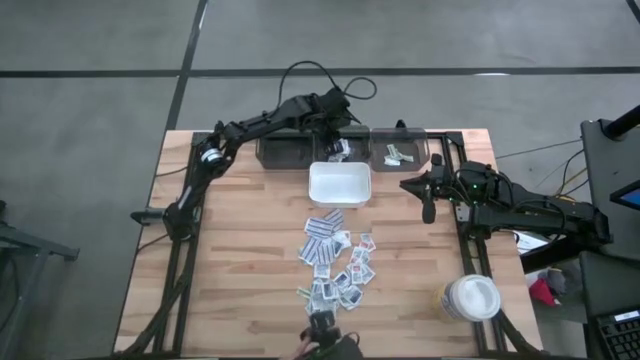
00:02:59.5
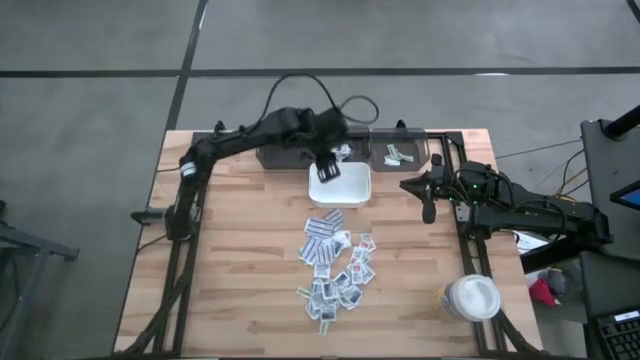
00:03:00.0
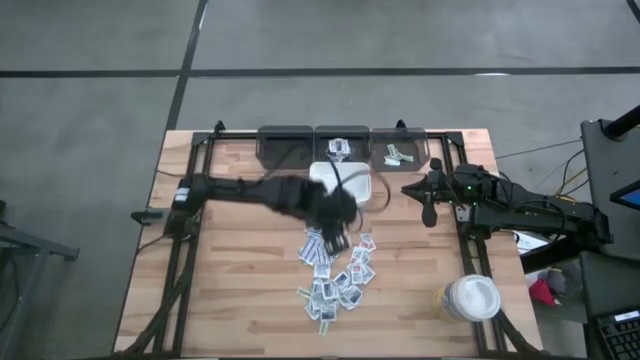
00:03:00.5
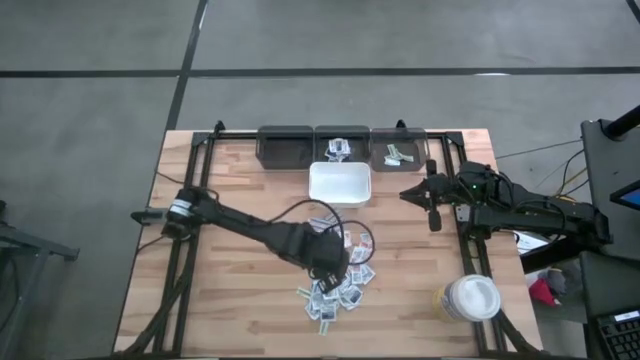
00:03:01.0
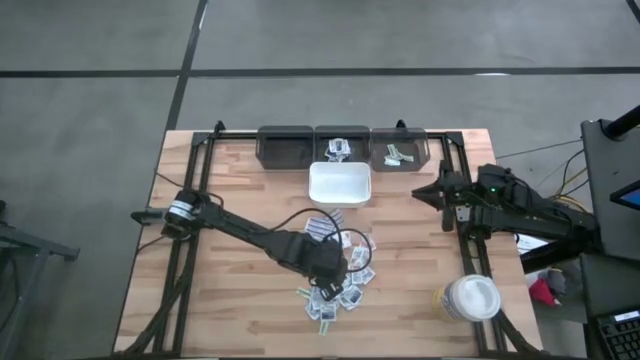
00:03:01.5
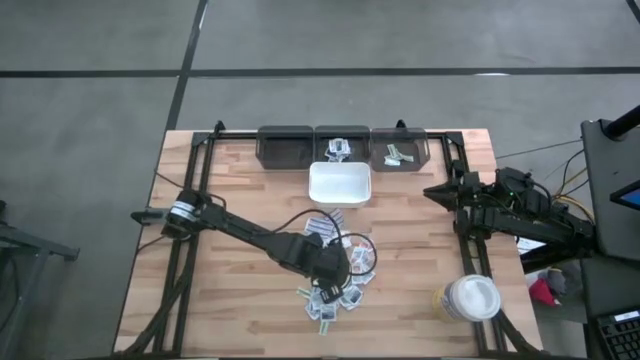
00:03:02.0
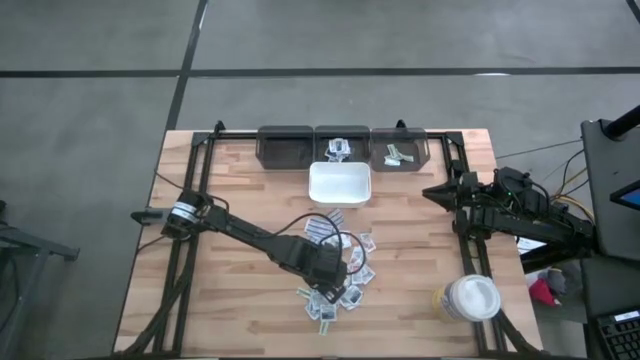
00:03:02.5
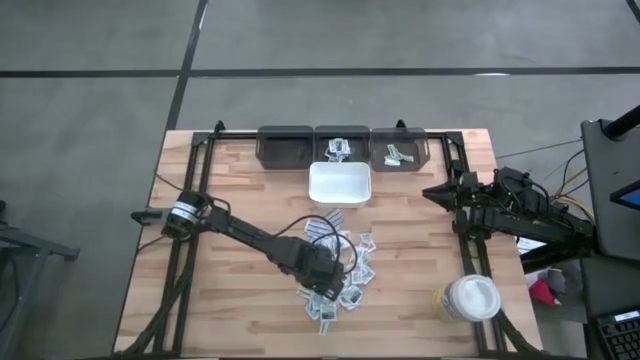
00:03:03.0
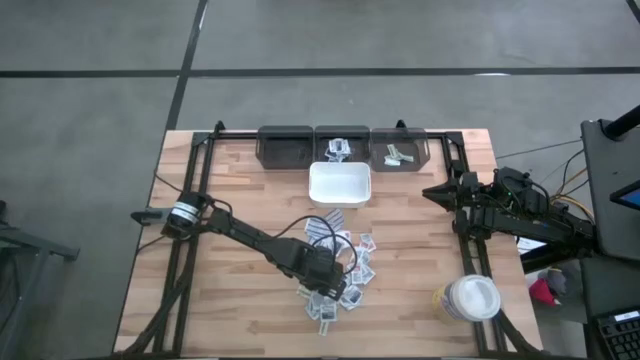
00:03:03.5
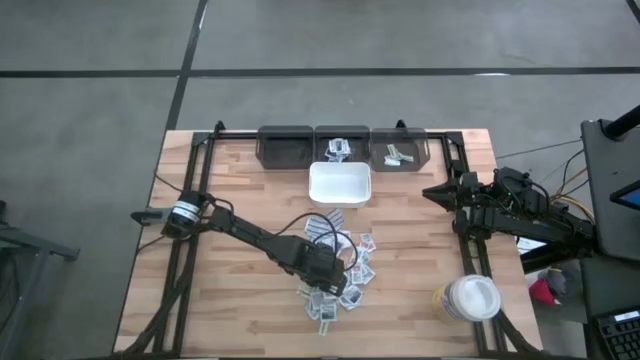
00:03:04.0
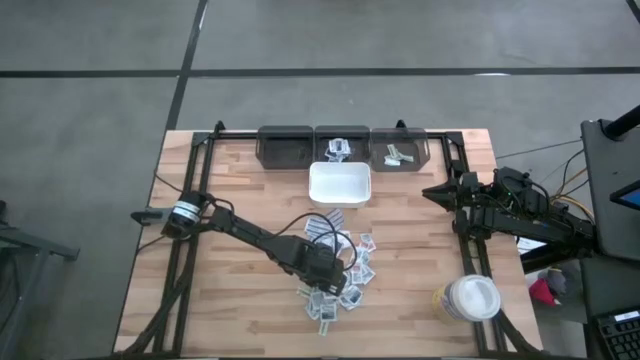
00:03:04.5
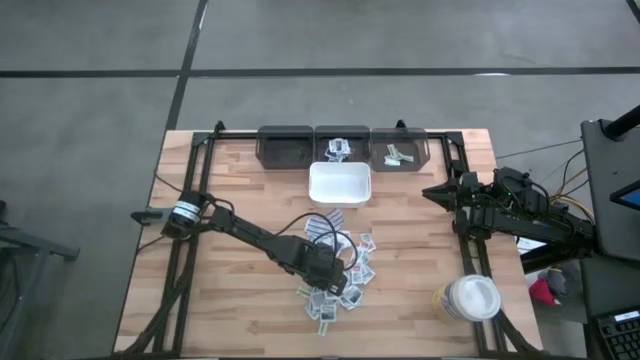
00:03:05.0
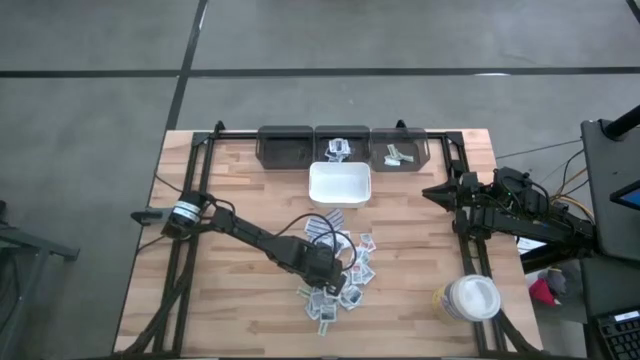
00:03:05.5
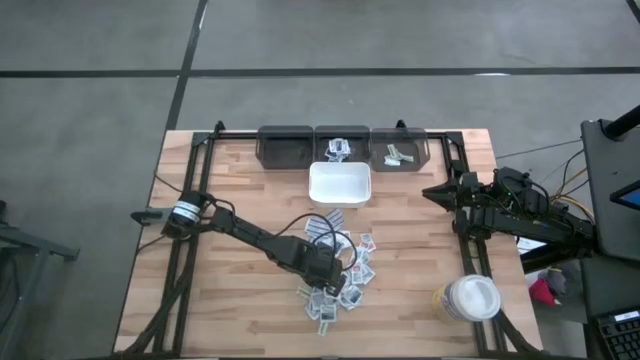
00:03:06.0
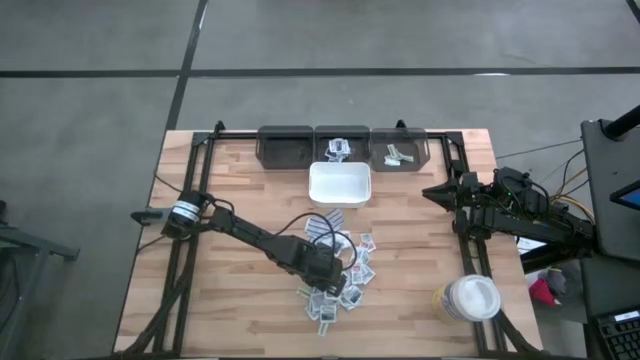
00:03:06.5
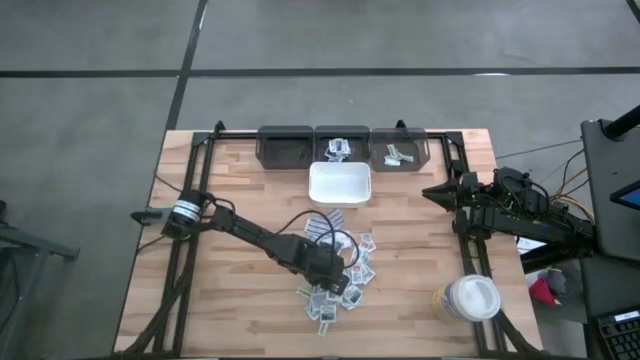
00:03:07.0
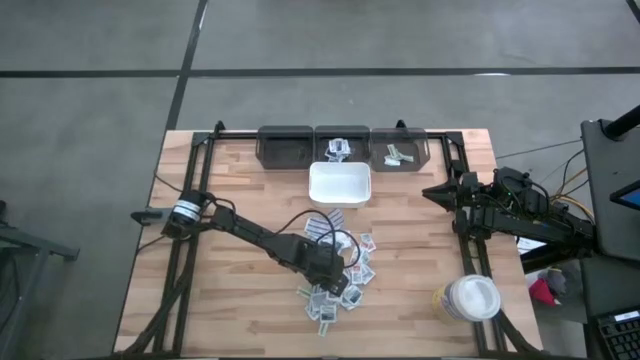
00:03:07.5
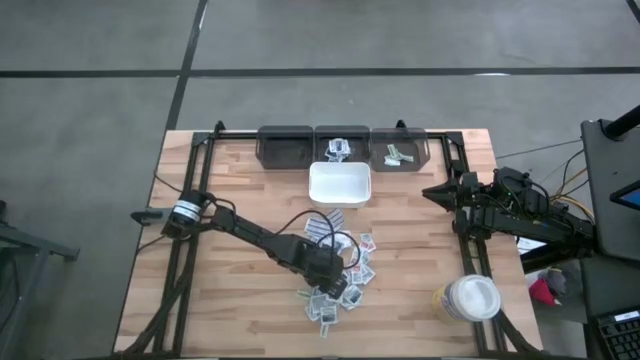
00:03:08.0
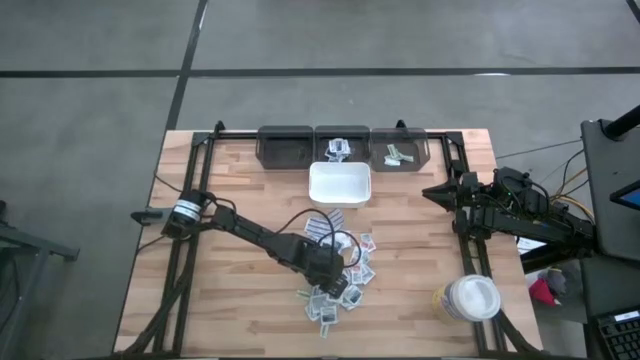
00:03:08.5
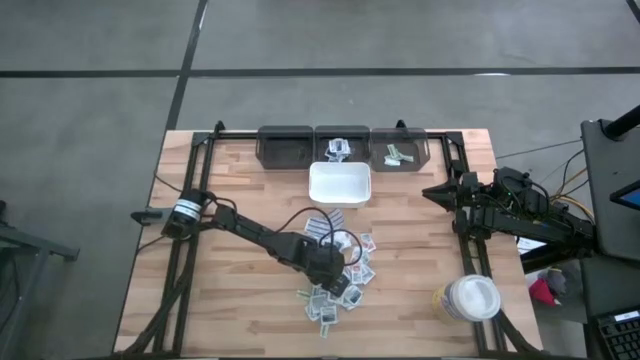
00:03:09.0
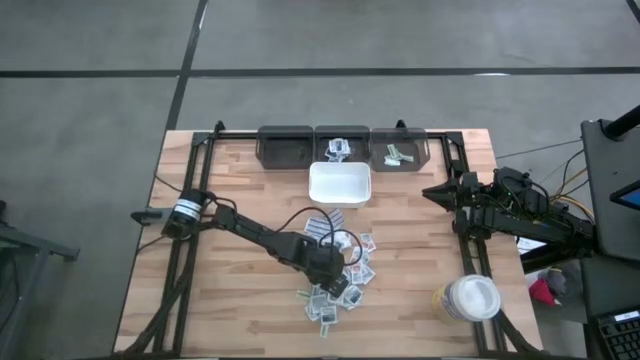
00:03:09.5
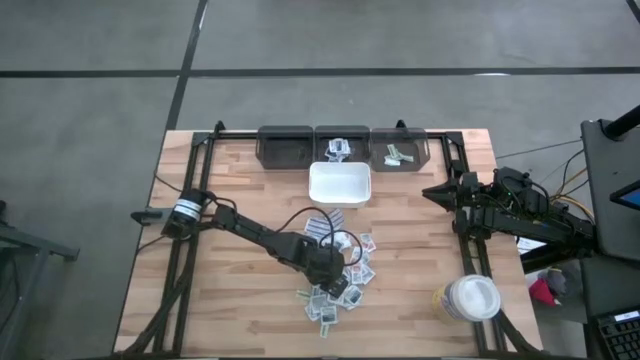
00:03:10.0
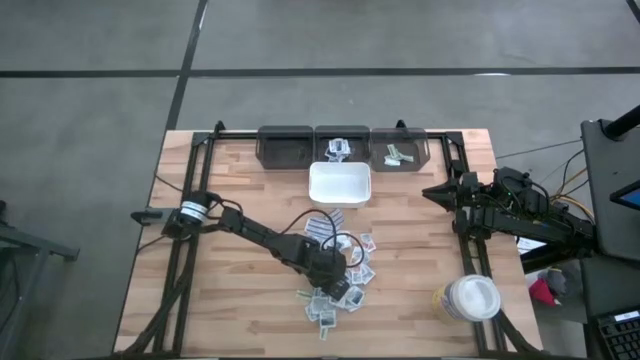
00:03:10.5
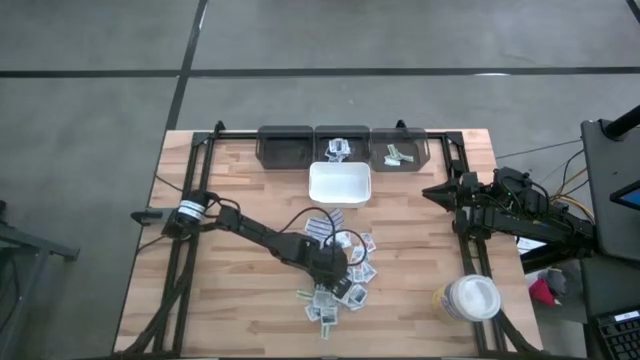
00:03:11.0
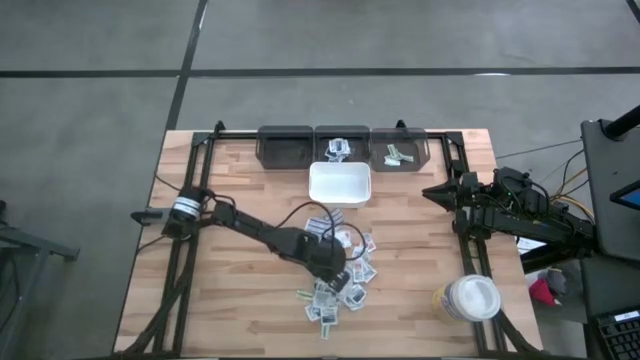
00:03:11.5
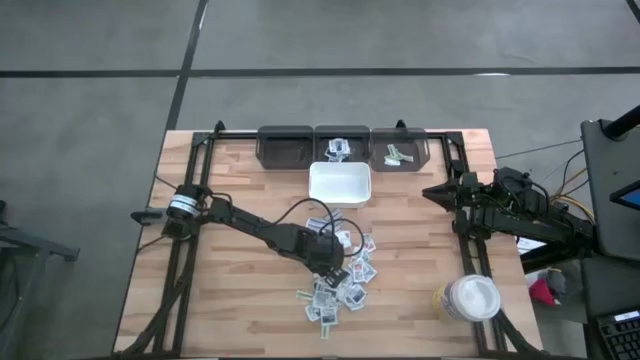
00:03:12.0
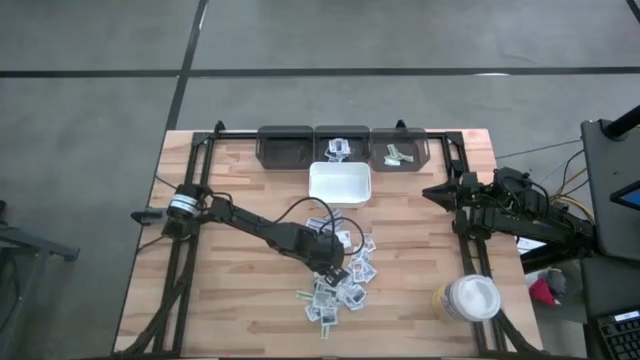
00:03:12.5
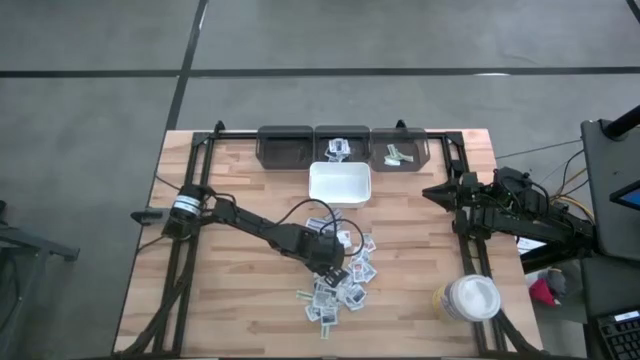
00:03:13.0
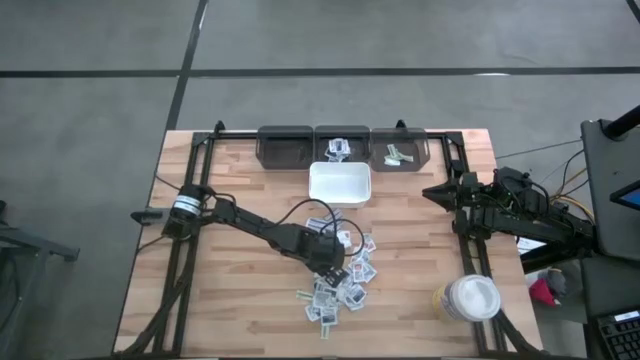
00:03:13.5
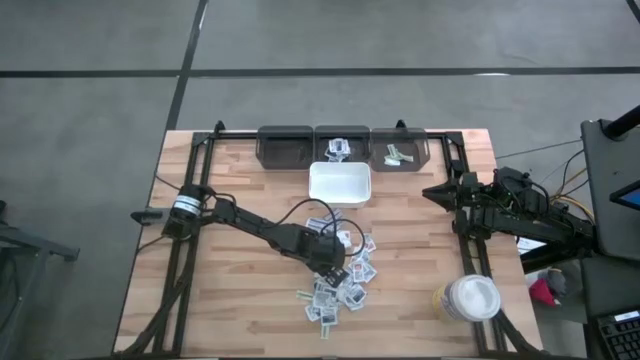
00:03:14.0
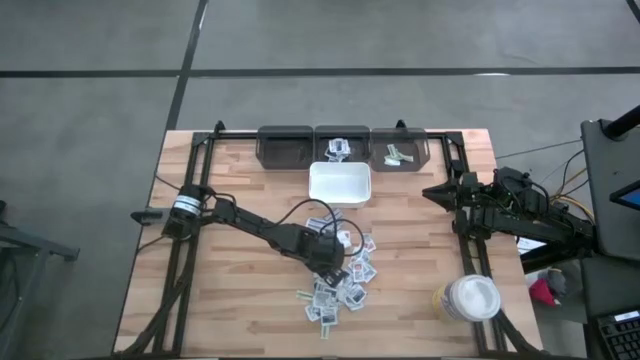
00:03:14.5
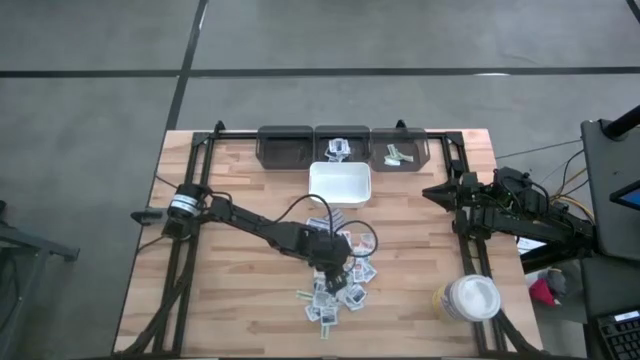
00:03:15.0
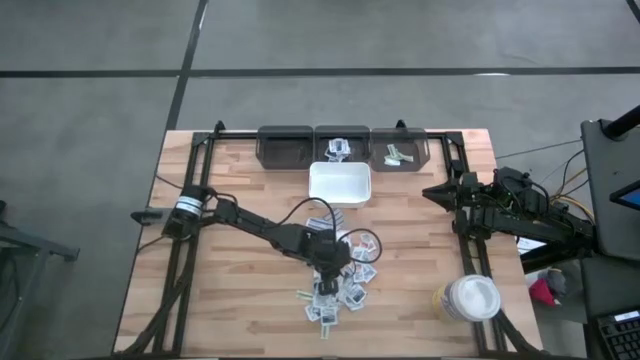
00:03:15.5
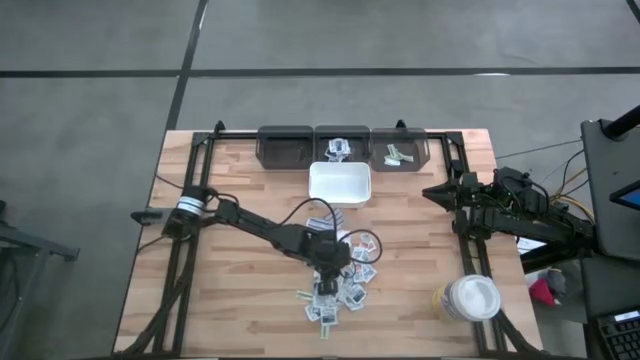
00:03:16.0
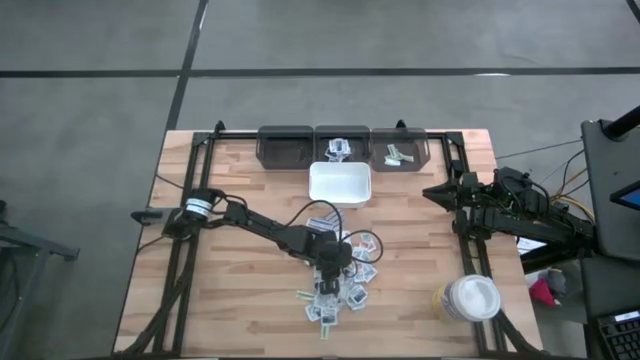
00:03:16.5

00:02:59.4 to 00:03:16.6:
Task: Pick & Place First Aid Supplies
Put the blue alcohol pad into the middle gray bin

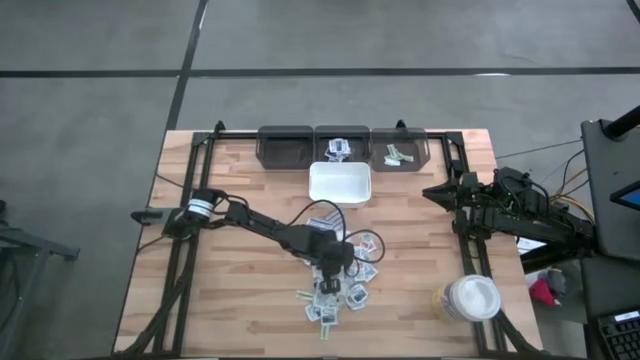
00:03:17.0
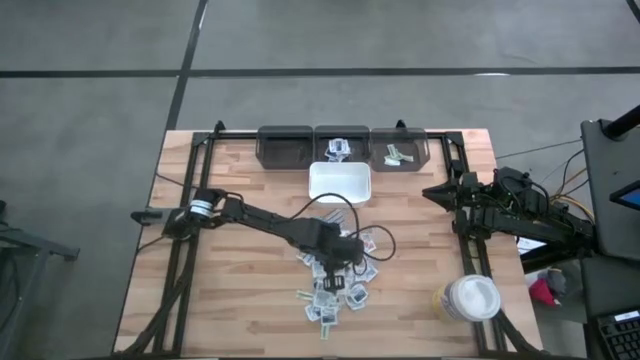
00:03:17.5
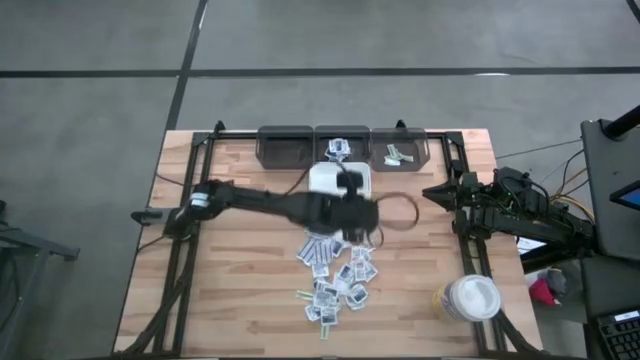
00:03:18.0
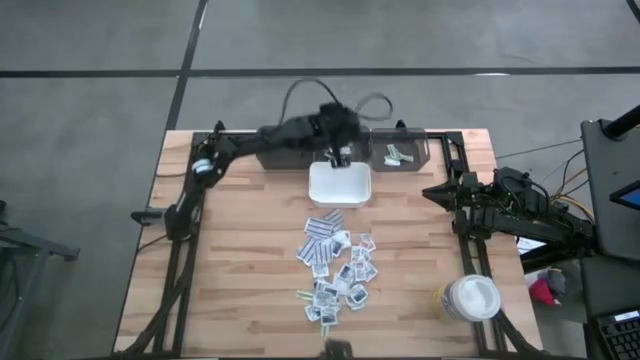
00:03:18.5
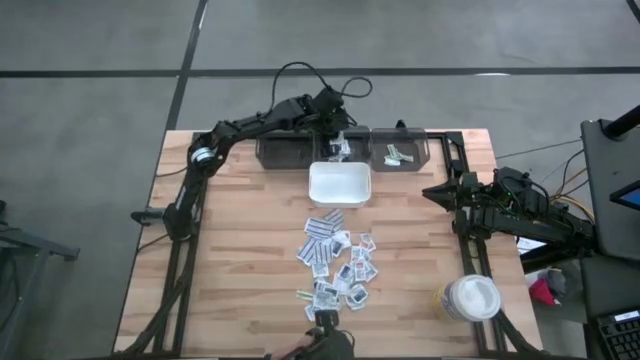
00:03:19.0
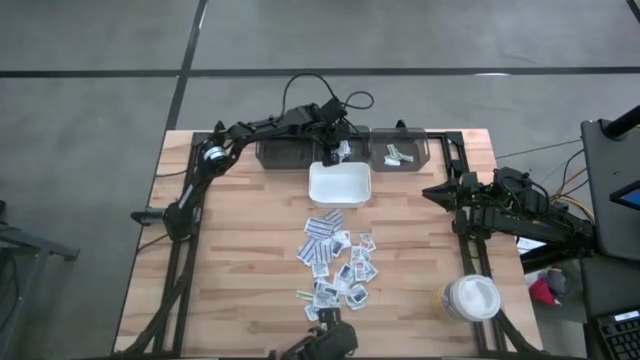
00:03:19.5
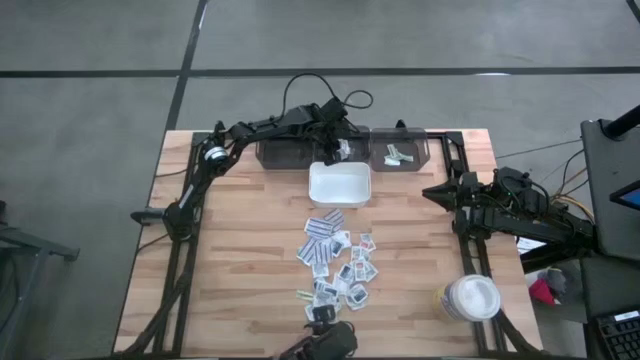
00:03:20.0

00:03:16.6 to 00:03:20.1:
Put the blue alcohol pad into the middle gray bin

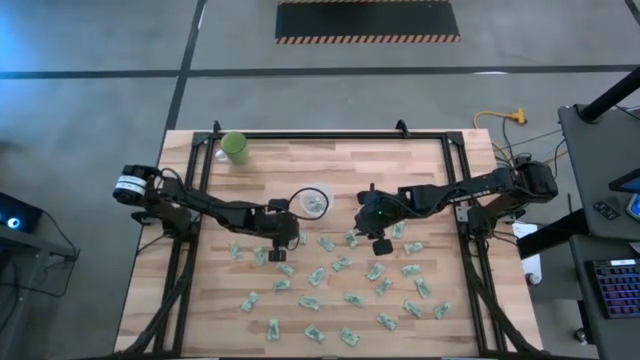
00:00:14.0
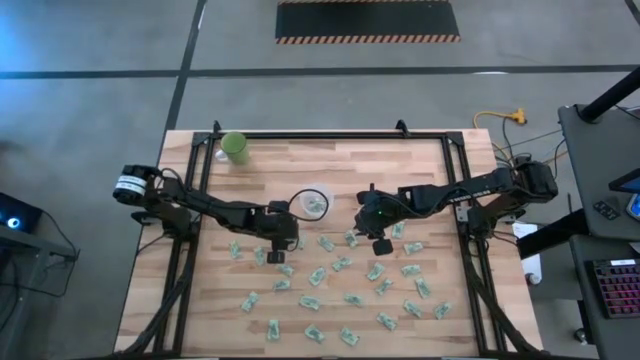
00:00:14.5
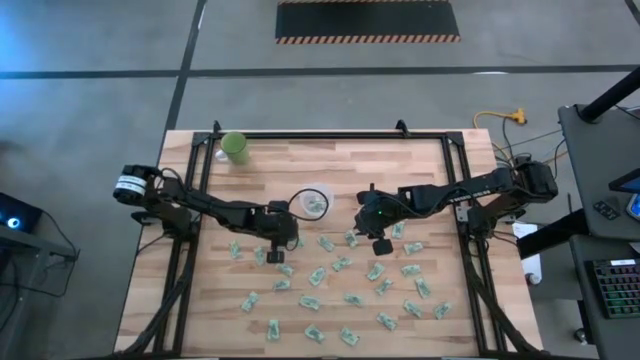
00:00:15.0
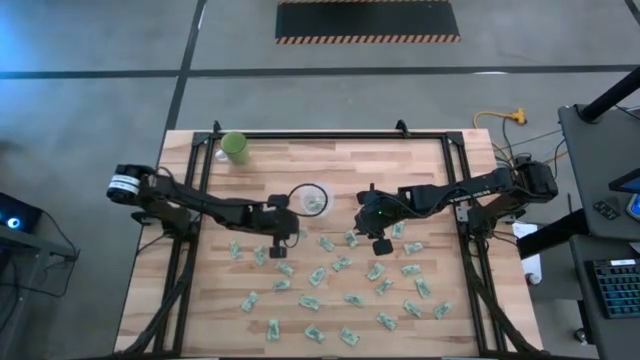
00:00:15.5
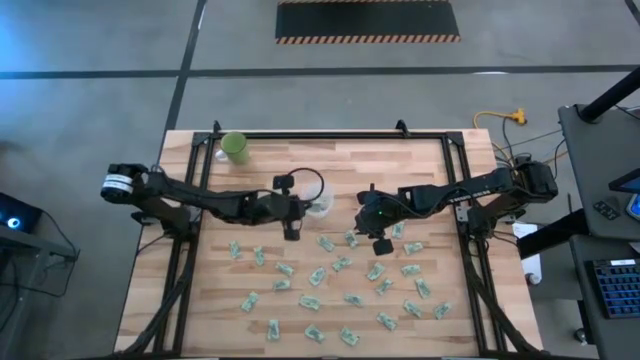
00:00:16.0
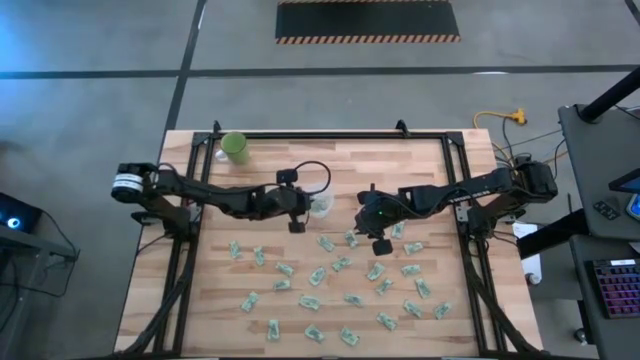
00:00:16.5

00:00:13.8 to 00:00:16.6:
Task: Pick and place Stevia / Truvia into bins
Put the green stevia packet into the transparent container
